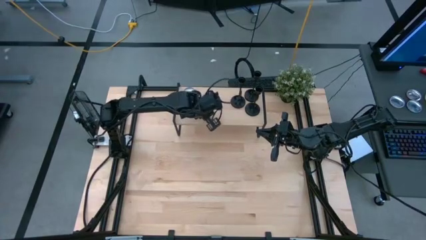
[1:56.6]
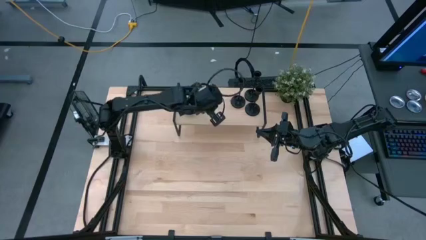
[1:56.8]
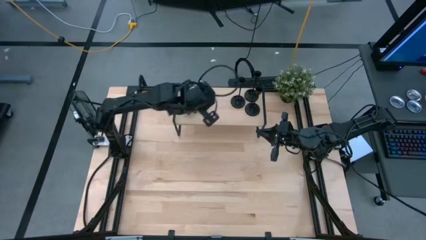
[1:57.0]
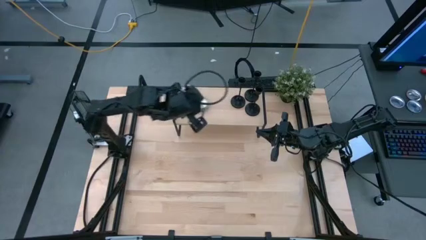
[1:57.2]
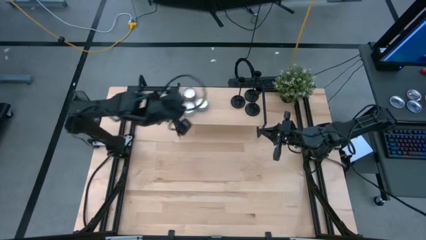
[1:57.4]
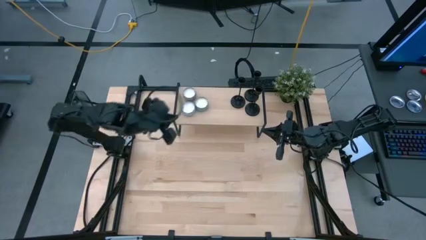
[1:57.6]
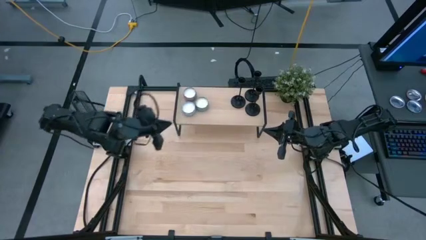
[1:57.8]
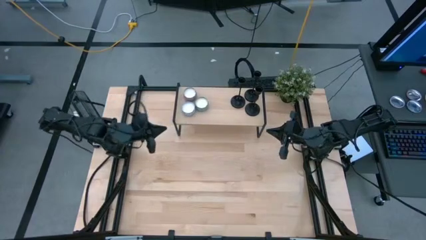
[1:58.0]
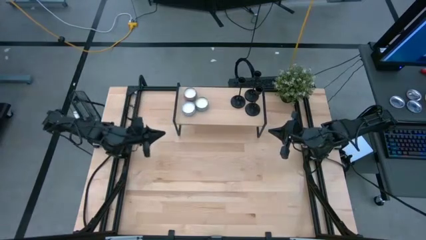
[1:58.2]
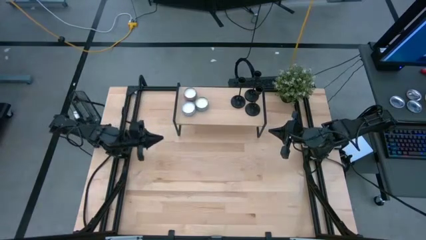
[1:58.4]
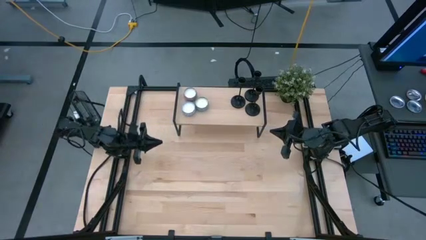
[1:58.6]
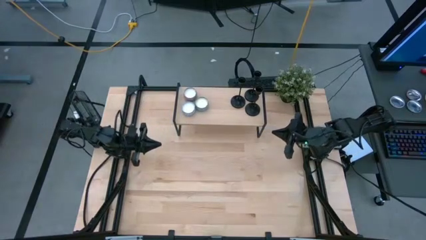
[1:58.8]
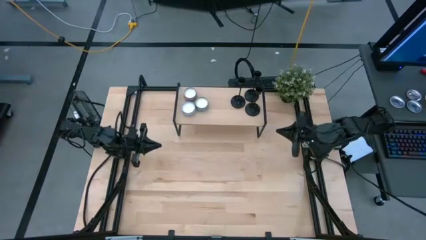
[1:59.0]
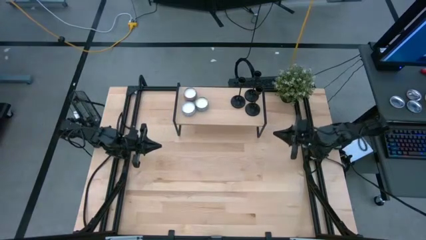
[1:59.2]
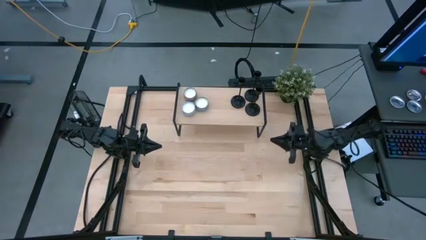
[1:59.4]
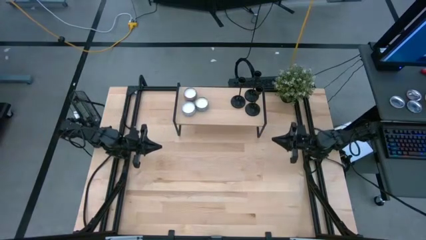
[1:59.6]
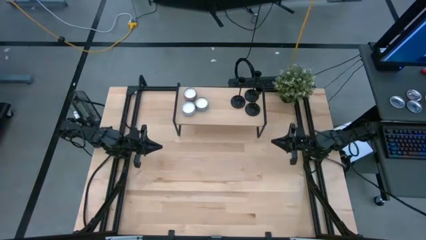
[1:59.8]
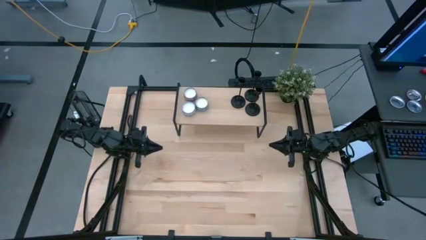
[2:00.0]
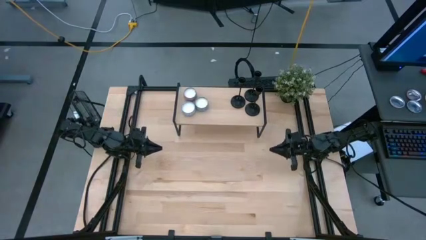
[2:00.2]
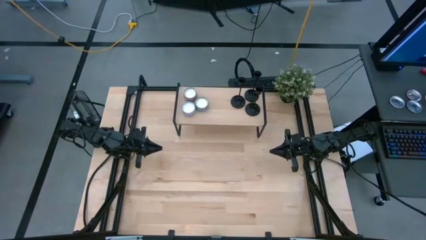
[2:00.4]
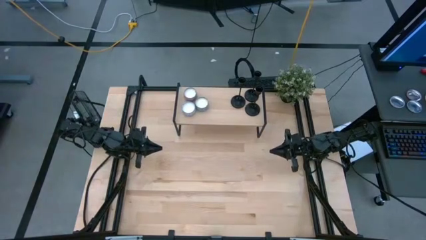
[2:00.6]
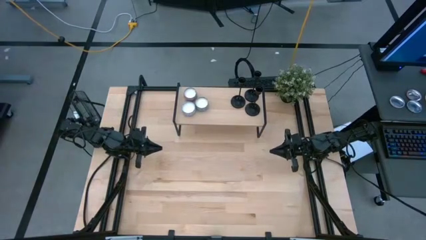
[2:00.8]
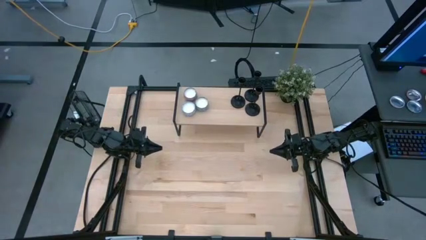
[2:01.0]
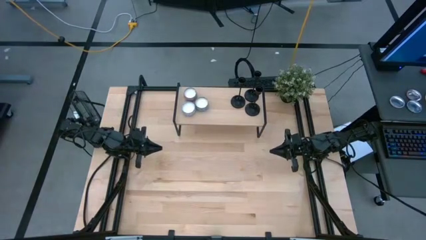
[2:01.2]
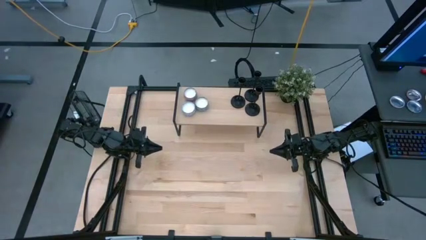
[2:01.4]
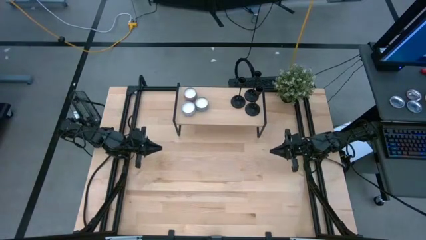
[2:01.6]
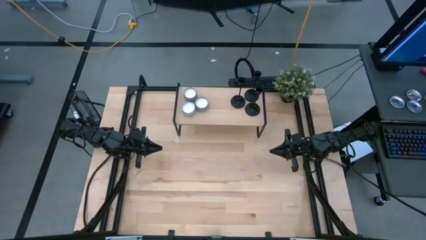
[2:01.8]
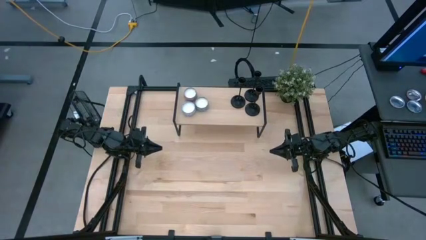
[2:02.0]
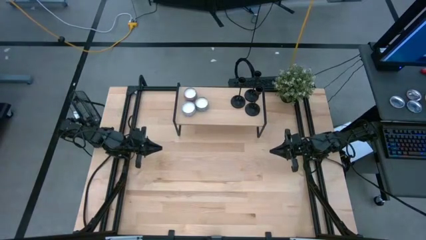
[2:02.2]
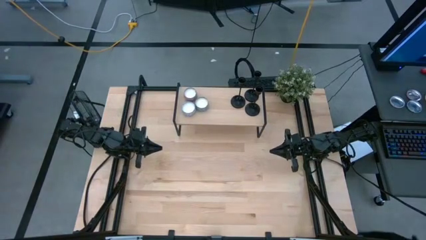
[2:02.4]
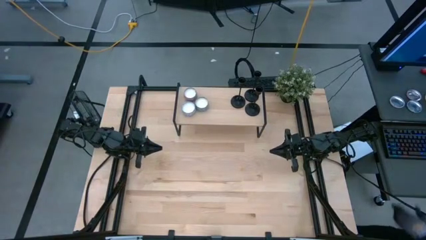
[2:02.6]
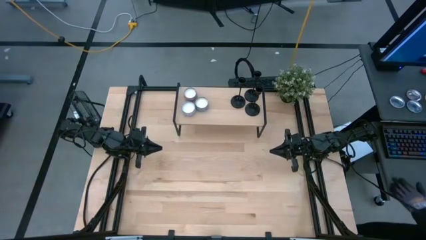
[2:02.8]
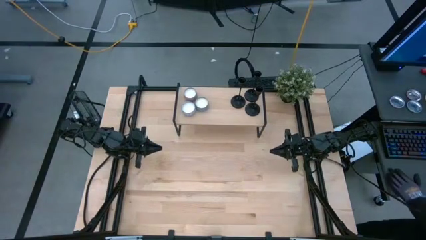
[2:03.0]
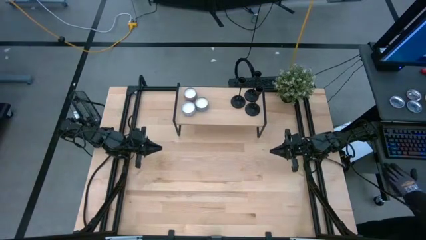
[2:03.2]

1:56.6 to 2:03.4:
Task: Pick & Place candle stick holders
Return to Home Position

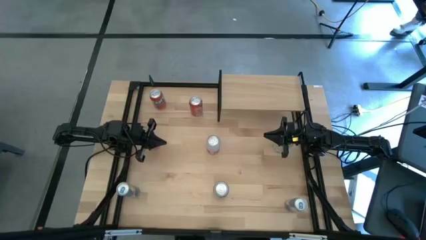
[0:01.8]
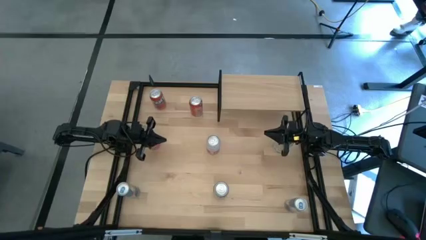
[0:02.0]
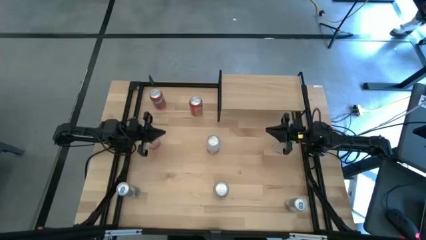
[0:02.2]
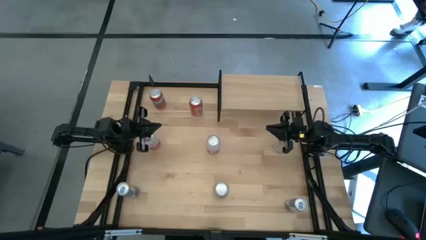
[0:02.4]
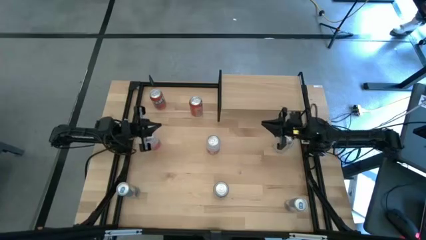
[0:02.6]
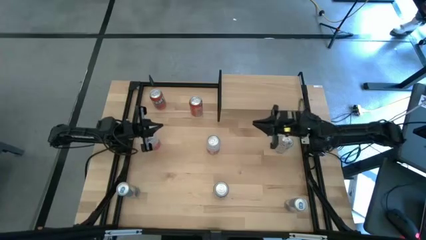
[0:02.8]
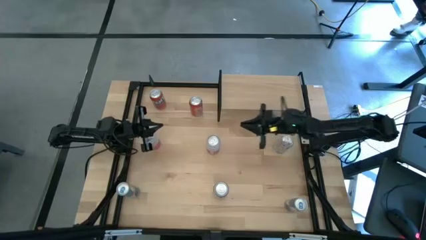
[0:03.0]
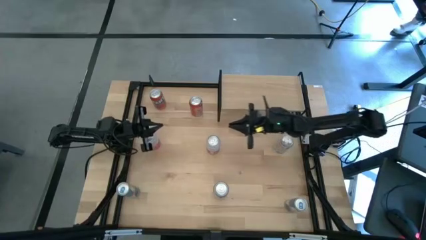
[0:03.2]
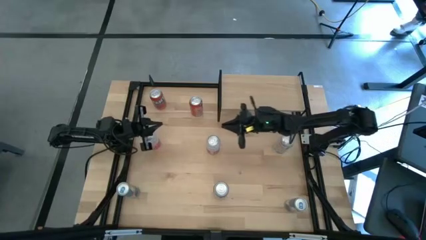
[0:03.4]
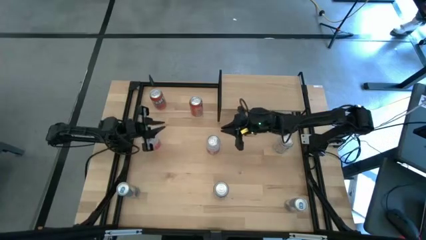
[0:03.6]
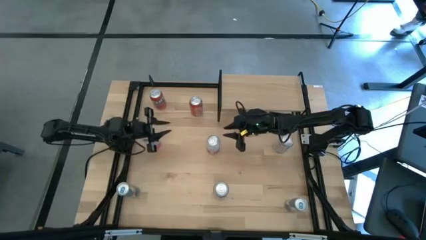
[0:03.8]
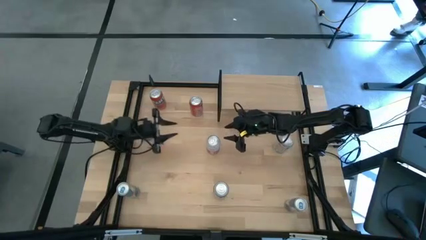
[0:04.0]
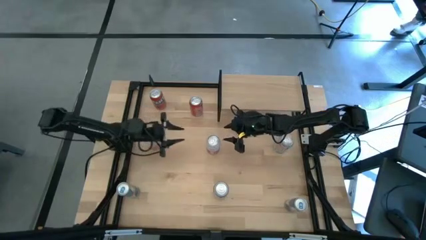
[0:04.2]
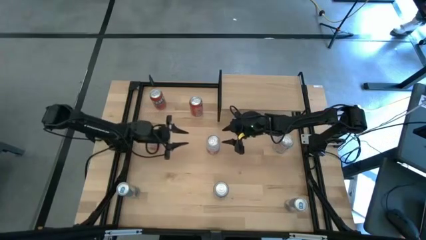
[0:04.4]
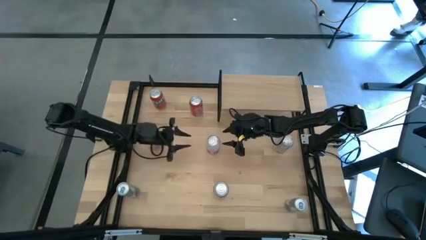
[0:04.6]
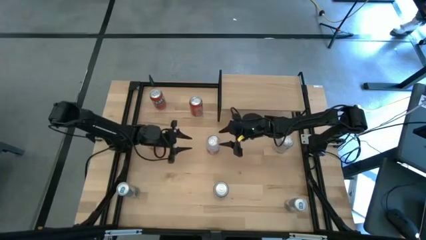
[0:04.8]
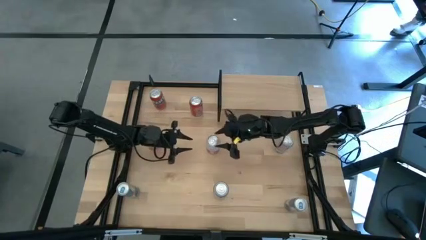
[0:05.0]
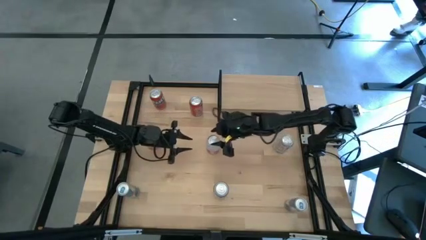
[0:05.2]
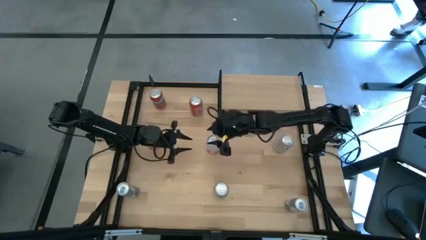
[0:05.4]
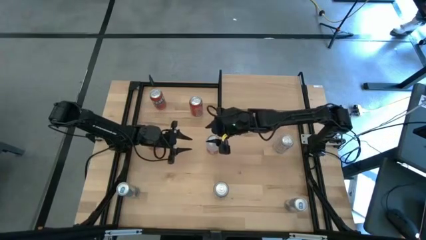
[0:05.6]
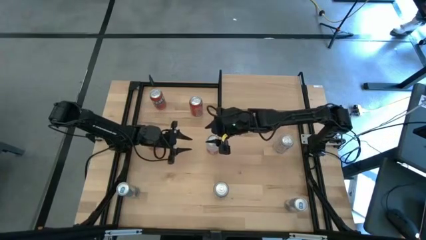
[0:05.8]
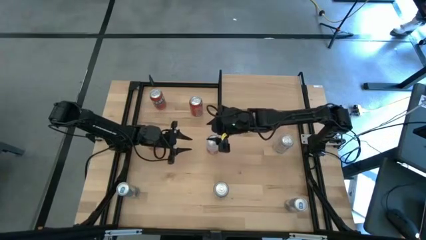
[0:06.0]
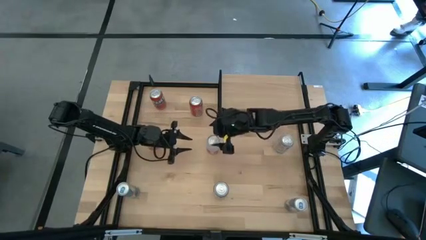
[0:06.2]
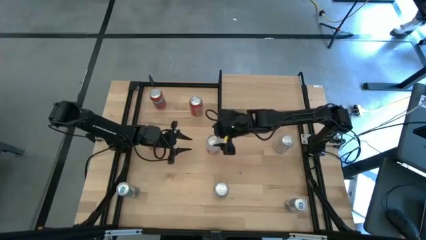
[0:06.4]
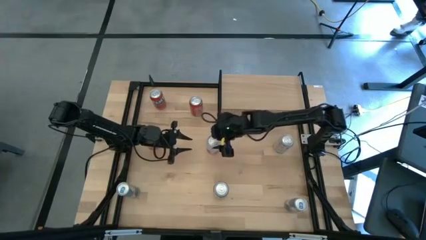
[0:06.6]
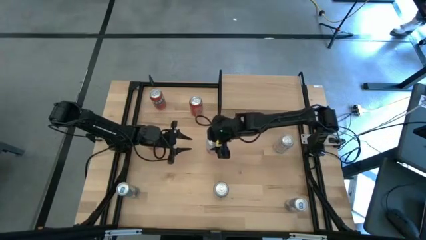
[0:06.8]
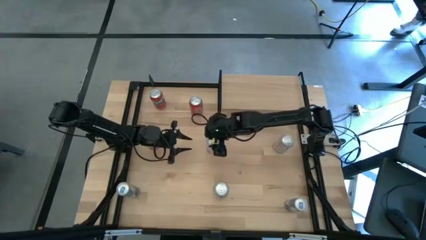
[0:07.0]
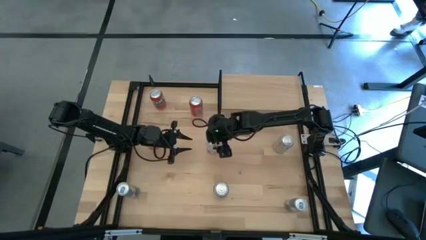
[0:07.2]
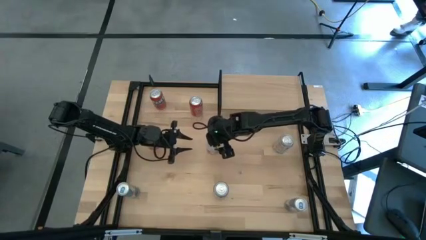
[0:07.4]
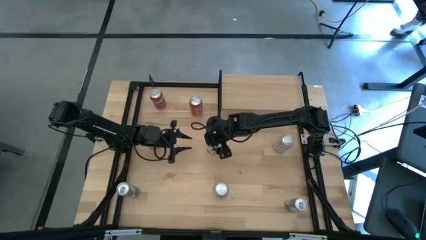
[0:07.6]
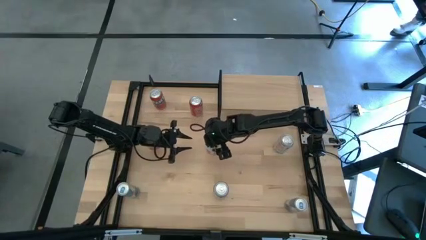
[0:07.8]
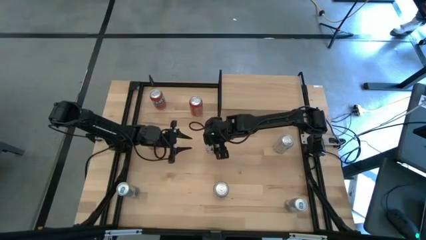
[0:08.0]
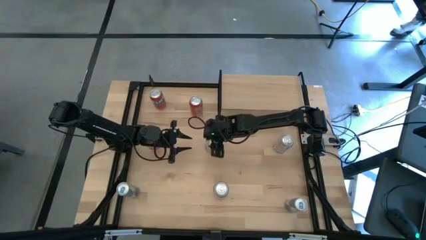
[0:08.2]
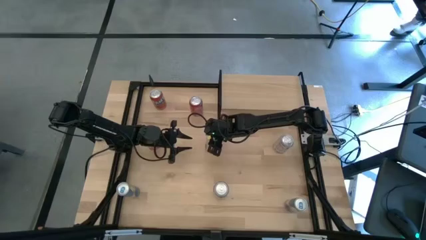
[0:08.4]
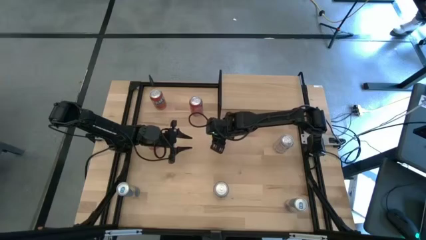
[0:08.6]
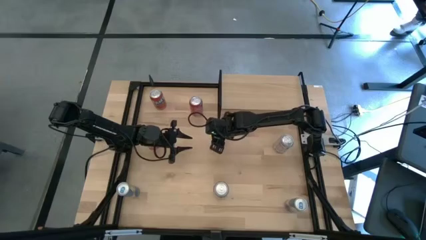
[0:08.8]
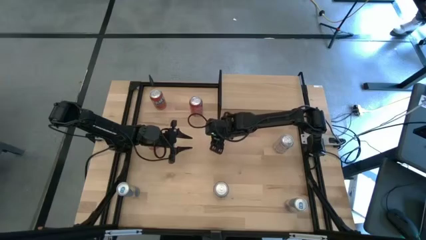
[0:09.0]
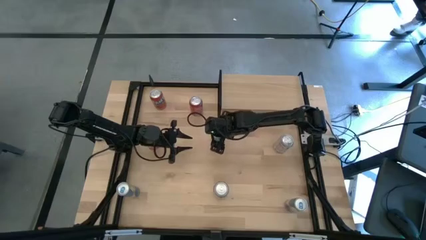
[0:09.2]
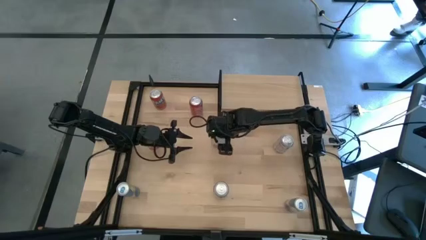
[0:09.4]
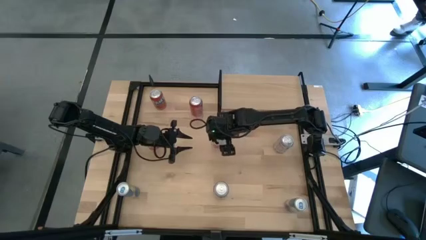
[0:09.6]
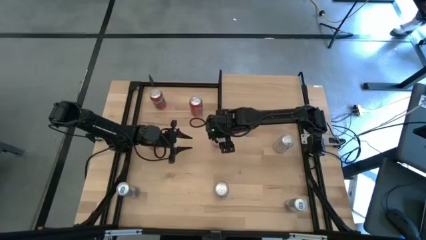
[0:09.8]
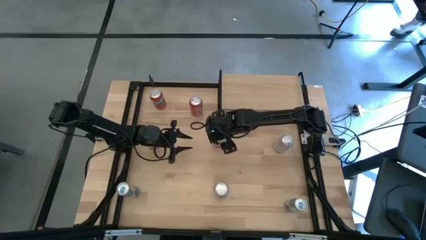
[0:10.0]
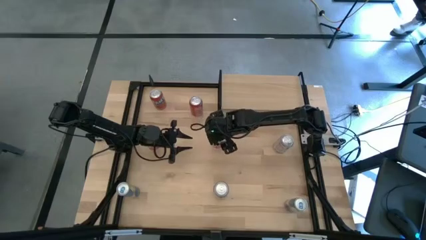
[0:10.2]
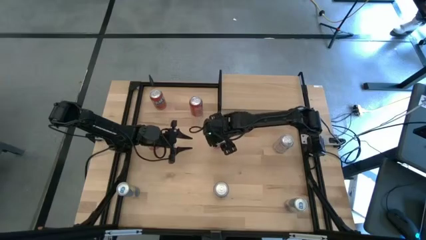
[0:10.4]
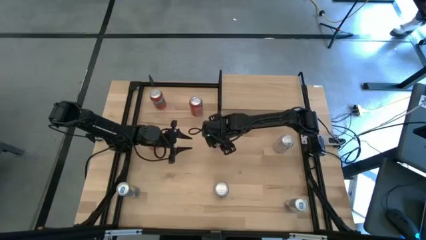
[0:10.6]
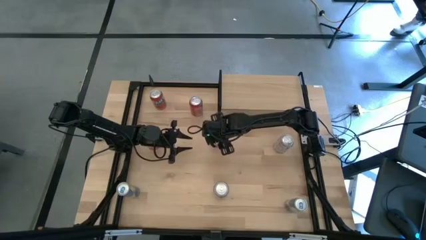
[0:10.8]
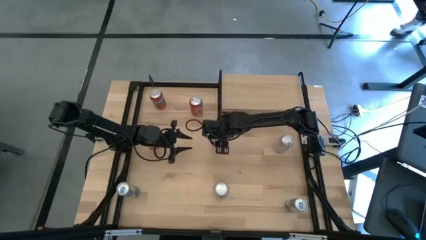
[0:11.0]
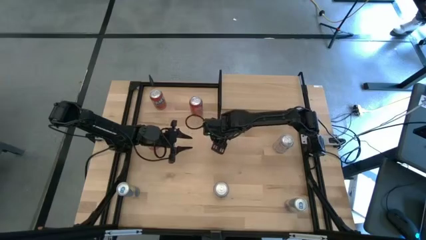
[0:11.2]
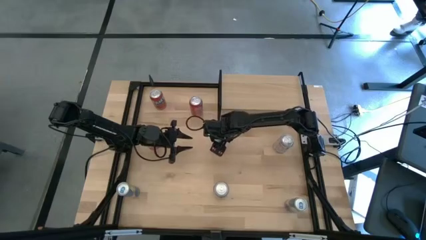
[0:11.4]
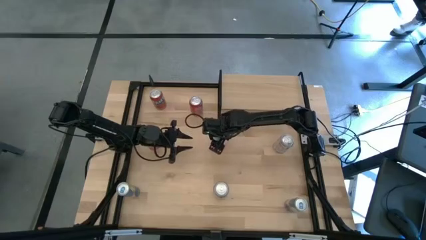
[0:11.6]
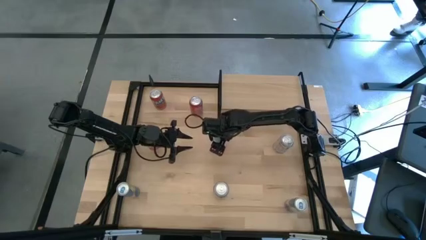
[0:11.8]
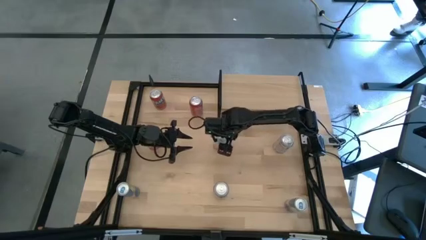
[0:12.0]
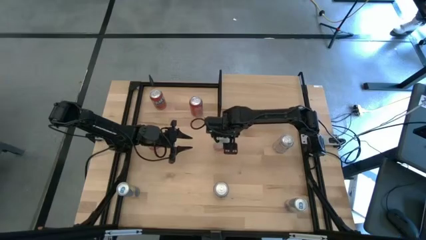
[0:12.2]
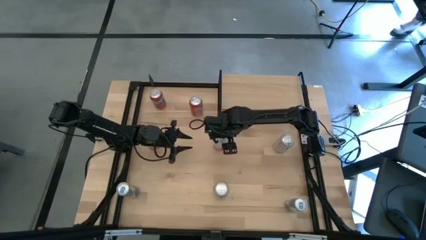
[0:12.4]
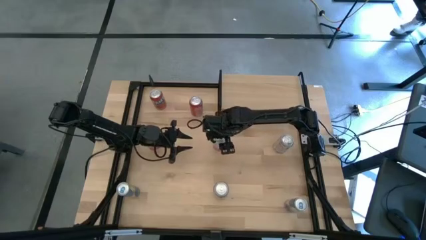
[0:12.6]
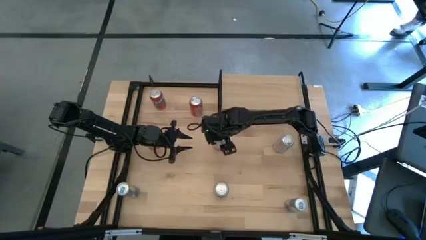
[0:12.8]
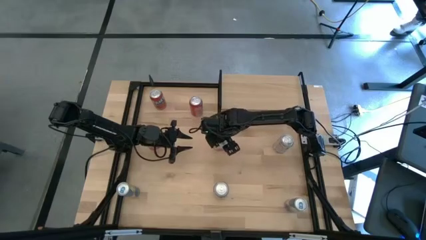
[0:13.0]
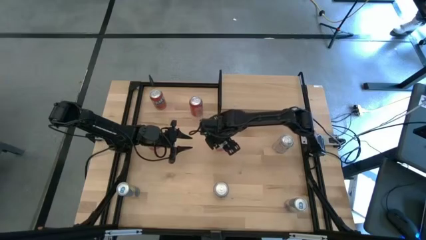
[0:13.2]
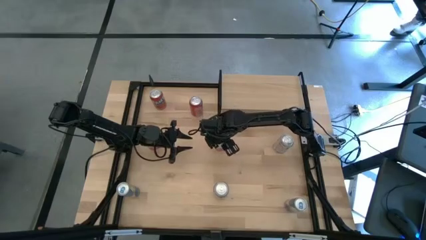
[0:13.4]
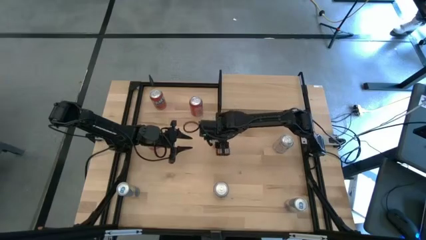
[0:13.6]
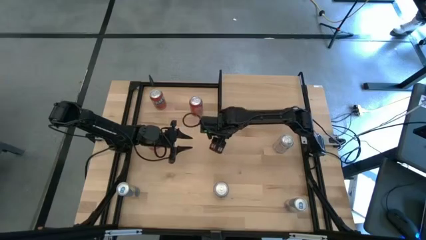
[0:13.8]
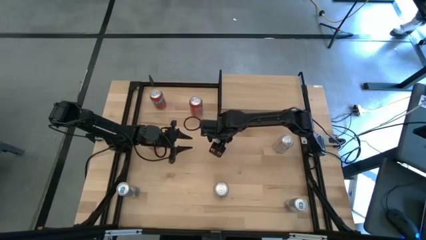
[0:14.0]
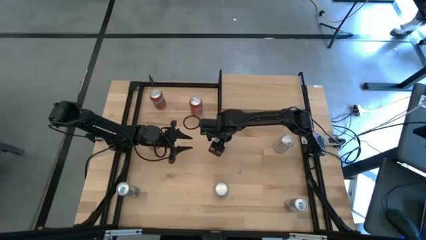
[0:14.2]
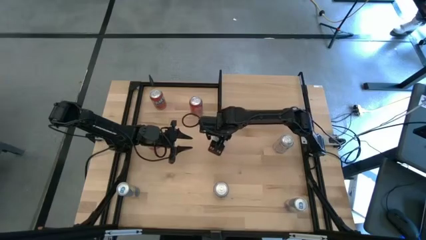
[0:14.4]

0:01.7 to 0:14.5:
Task: Place canned beverage on shelf
Put the right pink soda can on the shelf
